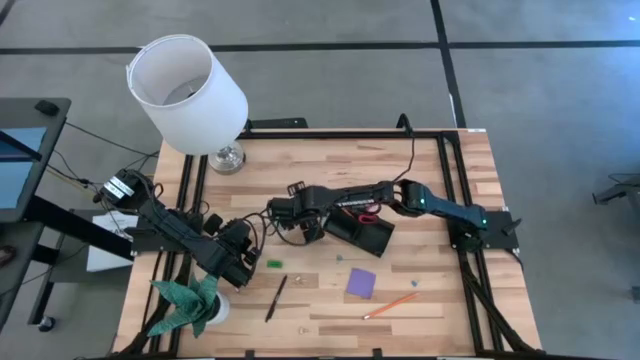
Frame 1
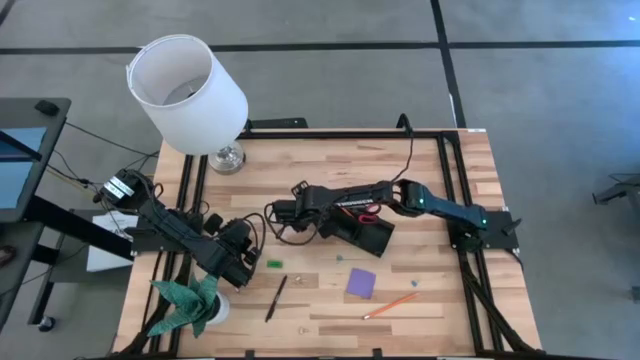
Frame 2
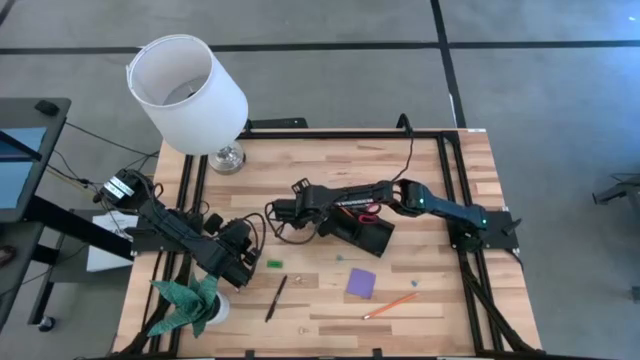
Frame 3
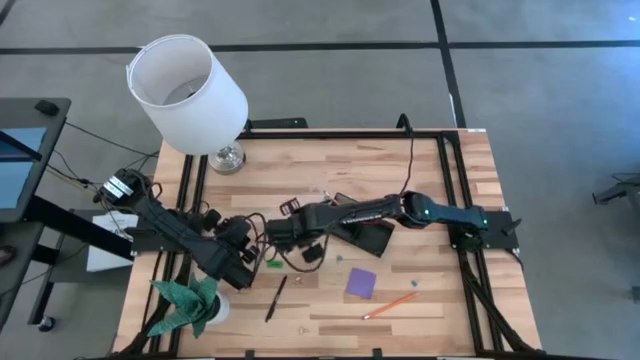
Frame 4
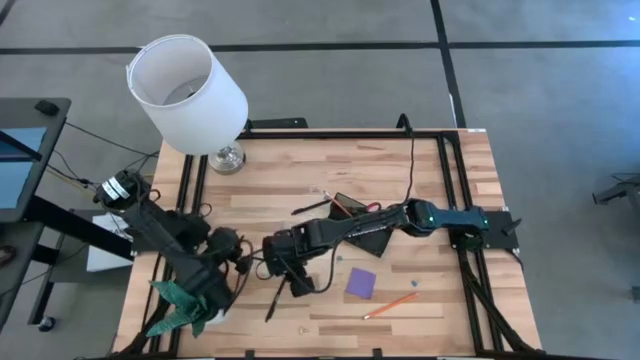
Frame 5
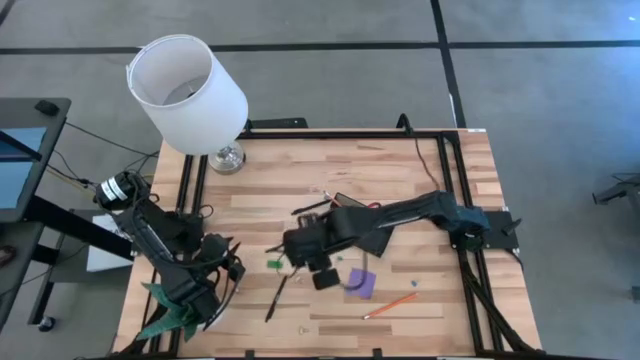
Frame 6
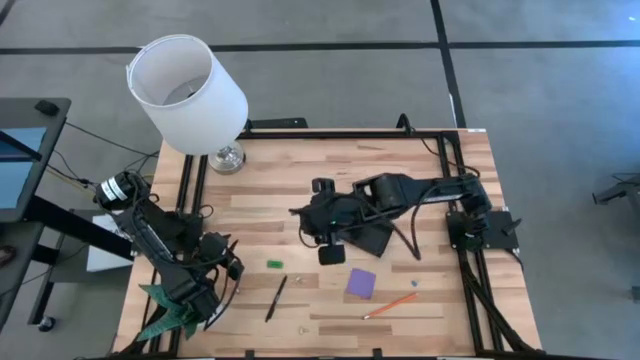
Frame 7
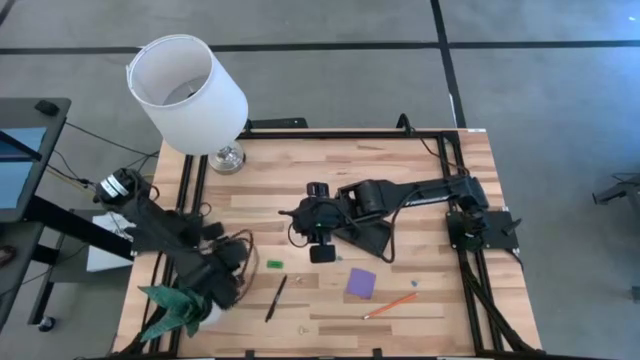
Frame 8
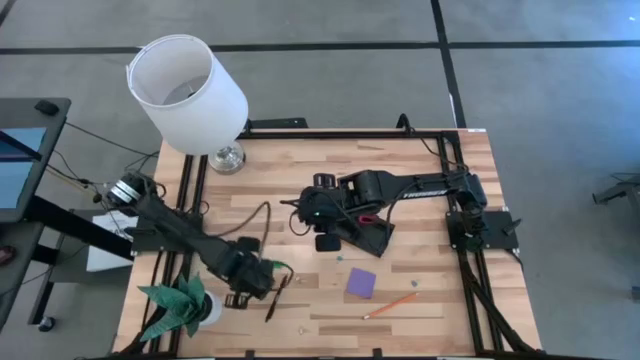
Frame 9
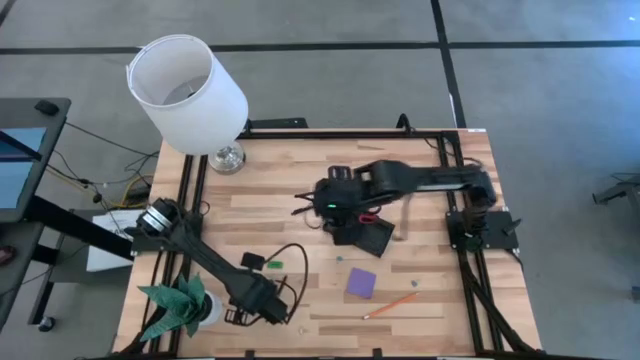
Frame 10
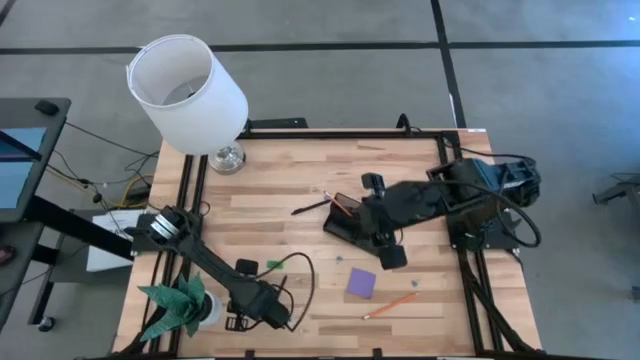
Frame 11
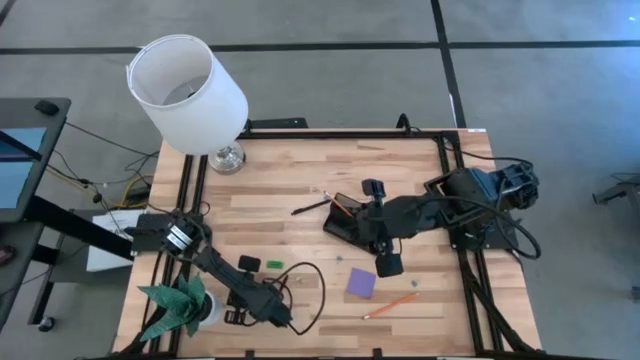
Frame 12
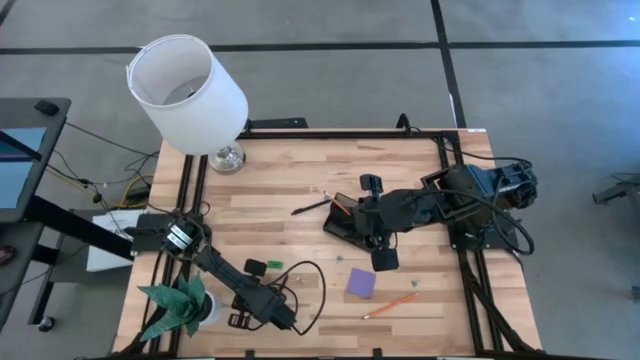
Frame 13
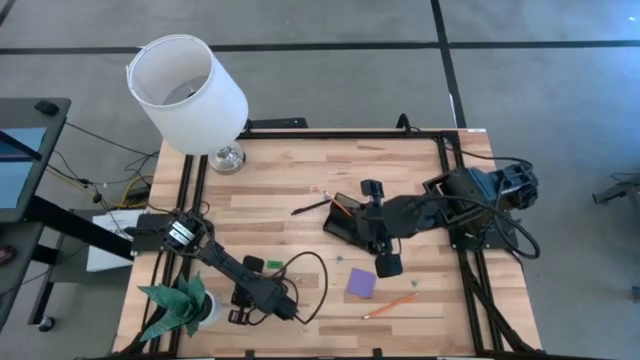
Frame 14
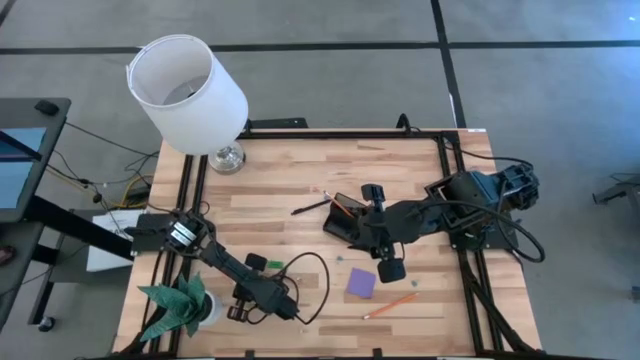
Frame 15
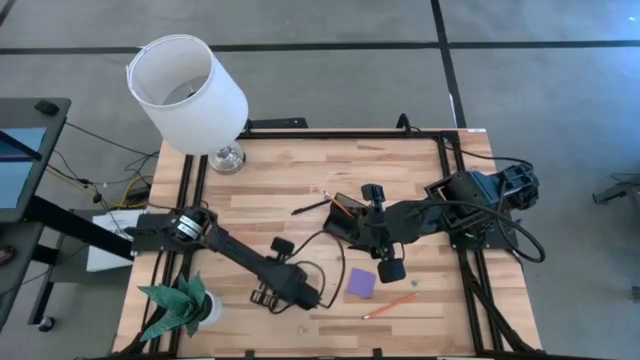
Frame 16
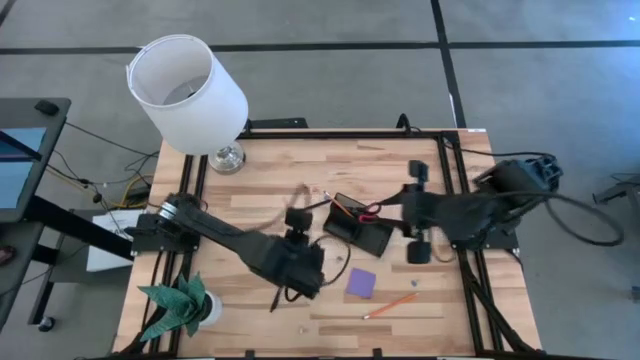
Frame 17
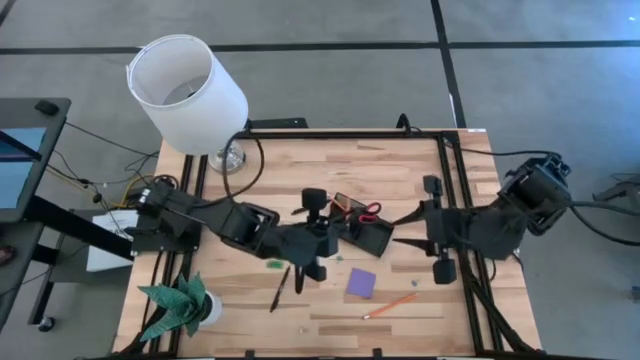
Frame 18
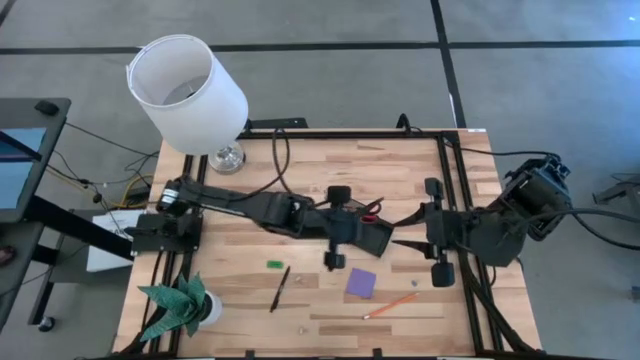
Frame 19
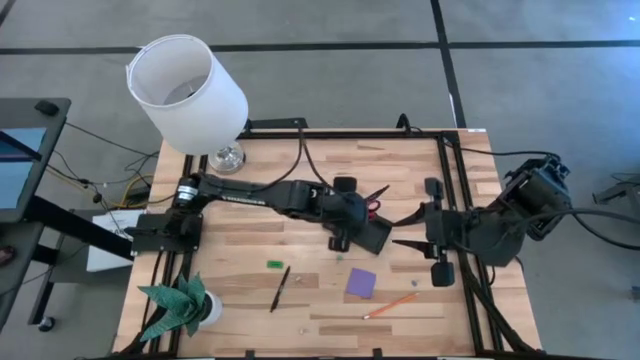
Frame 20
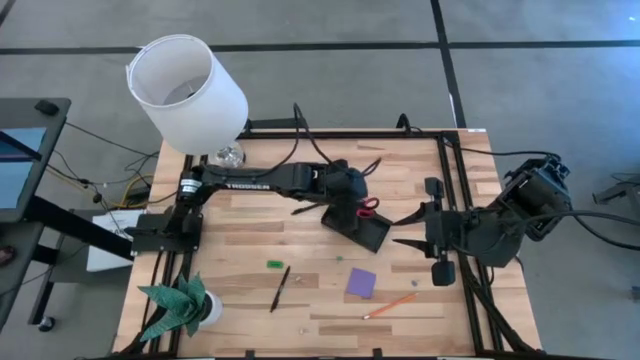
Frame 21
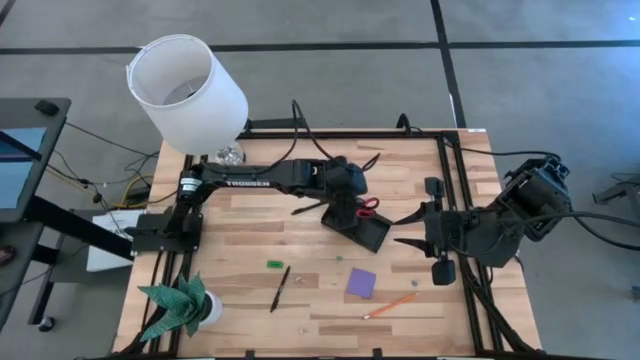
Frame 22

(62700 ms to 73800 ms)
Task: Pick and place office supplies into organizer
Put the left orange pencil into the black desk organizer

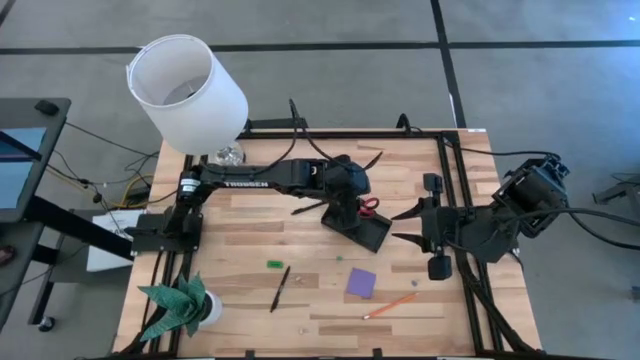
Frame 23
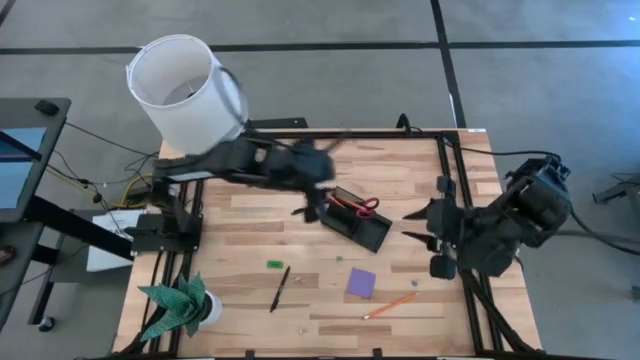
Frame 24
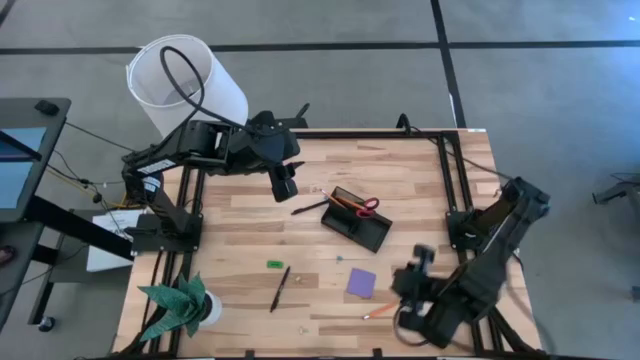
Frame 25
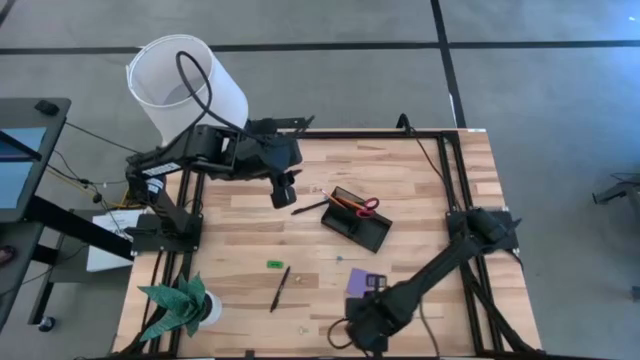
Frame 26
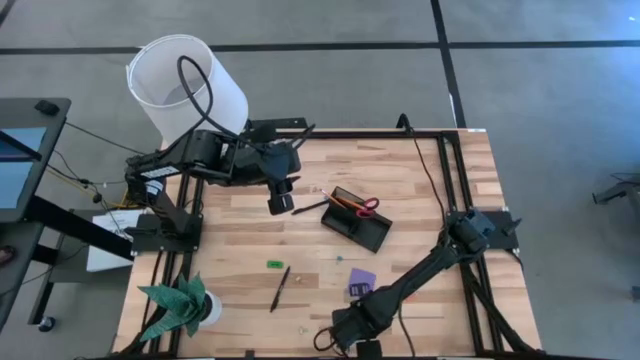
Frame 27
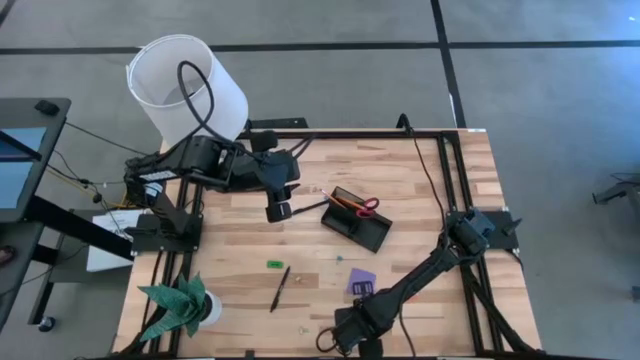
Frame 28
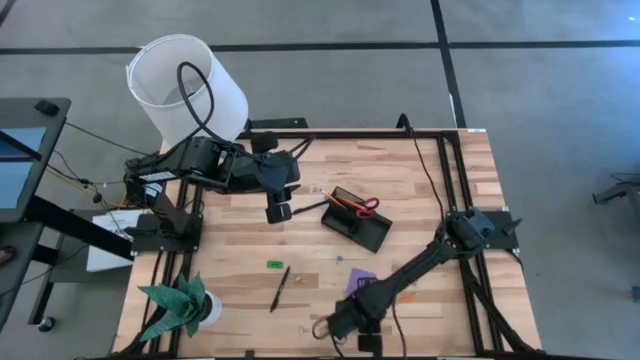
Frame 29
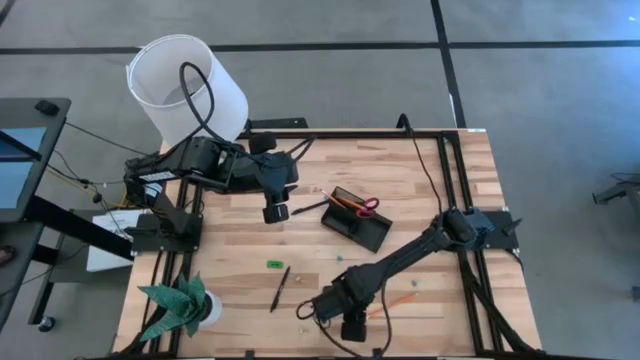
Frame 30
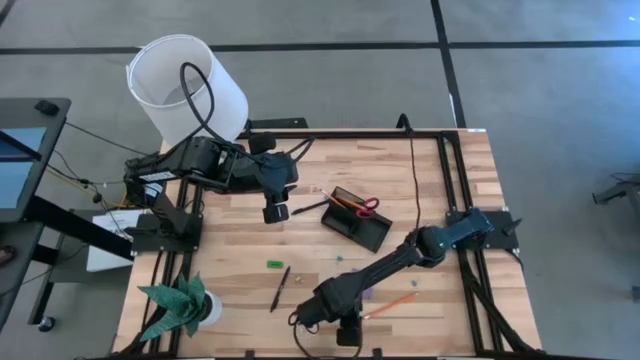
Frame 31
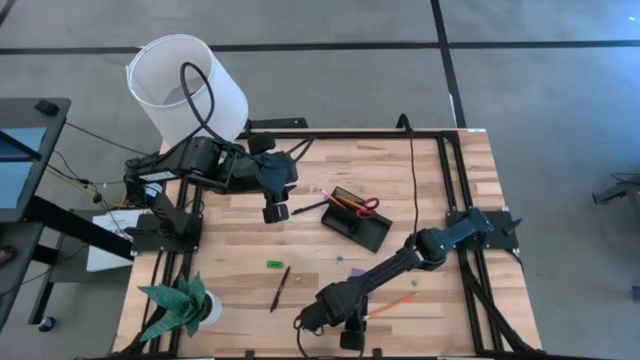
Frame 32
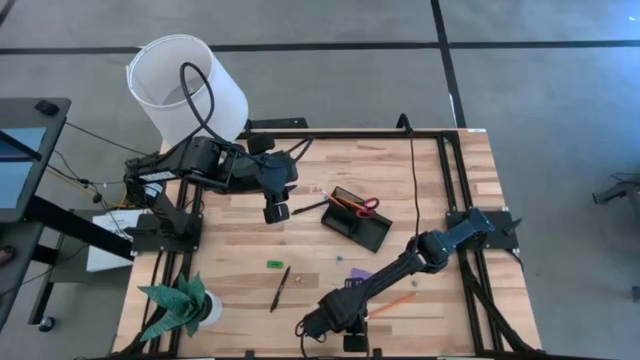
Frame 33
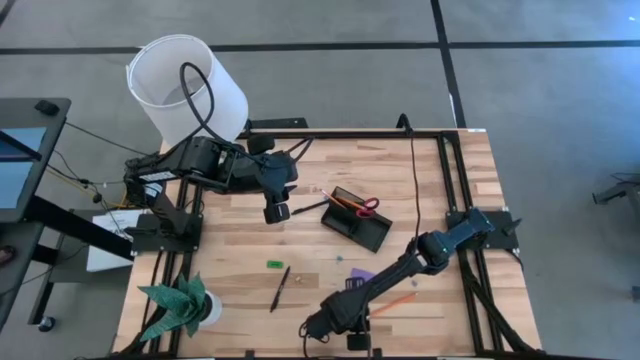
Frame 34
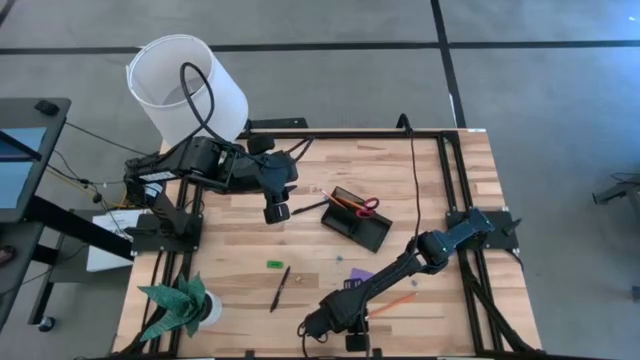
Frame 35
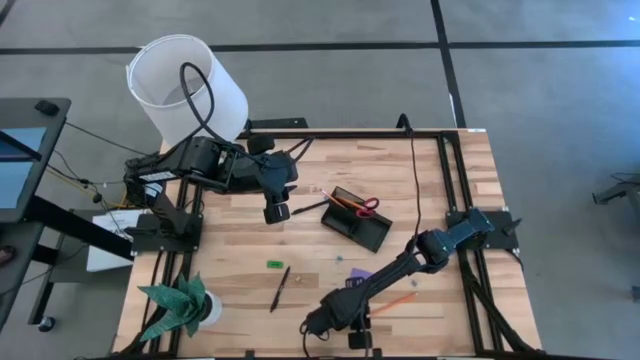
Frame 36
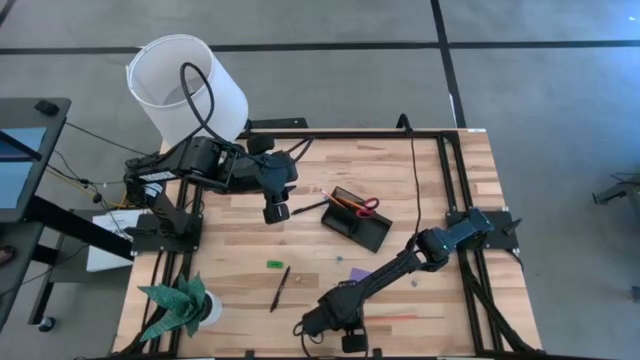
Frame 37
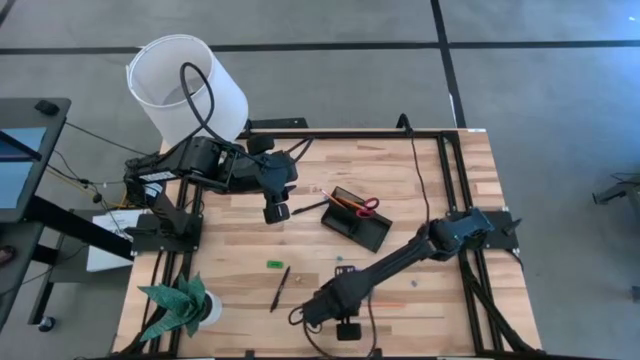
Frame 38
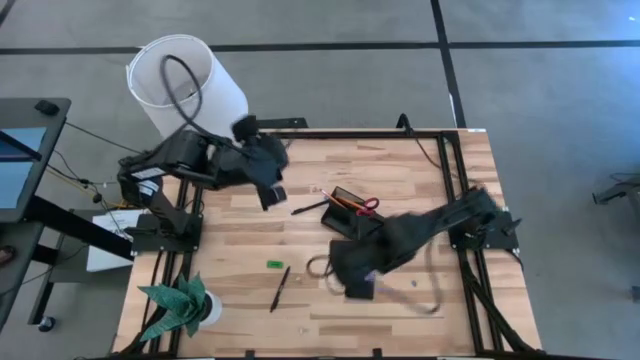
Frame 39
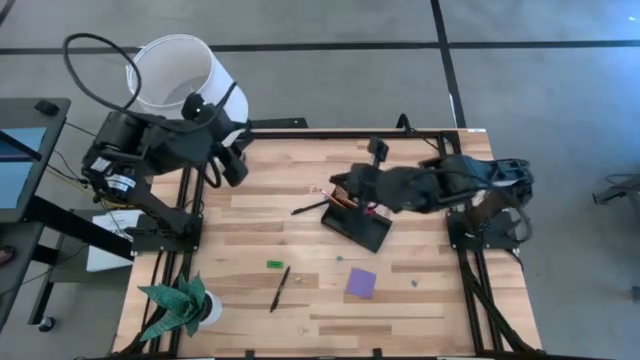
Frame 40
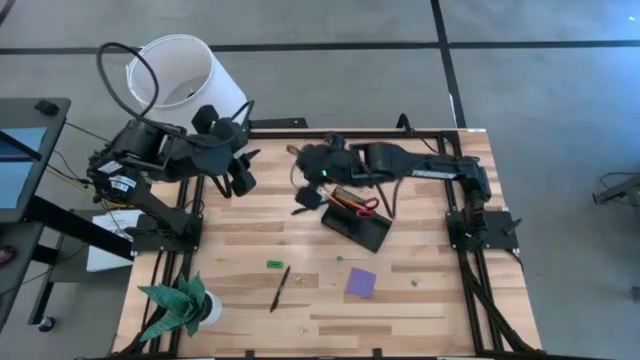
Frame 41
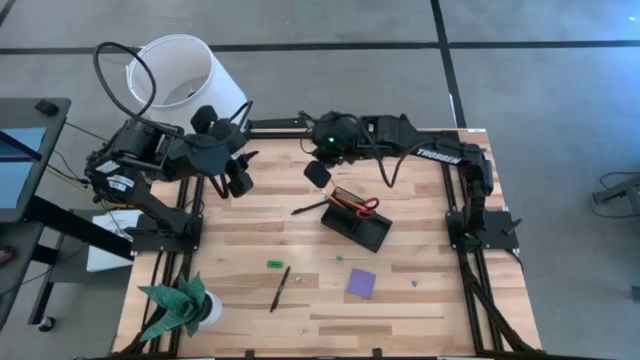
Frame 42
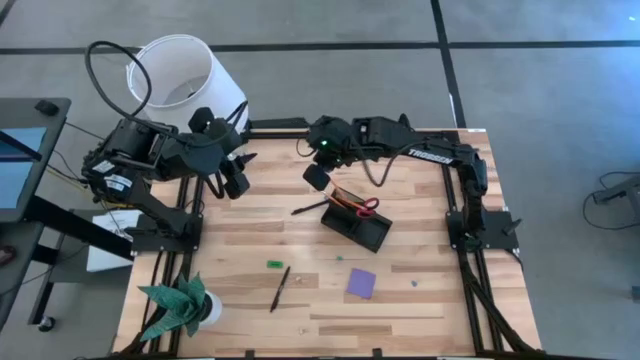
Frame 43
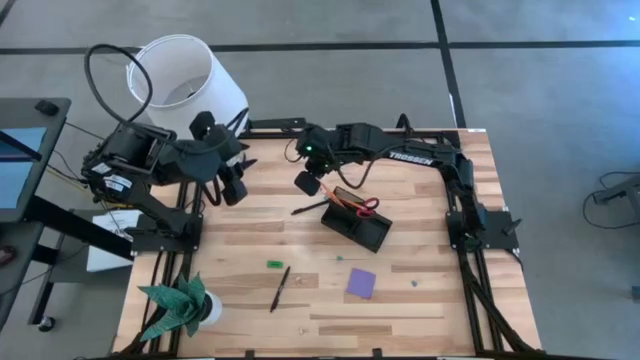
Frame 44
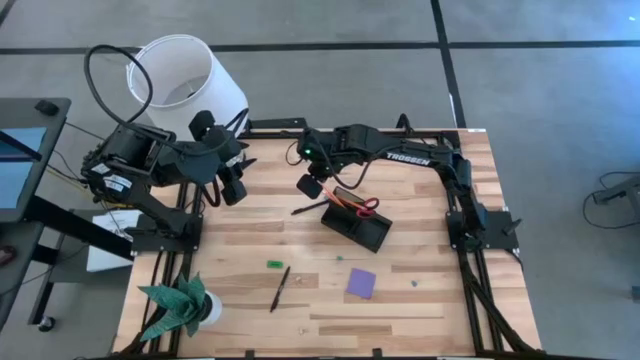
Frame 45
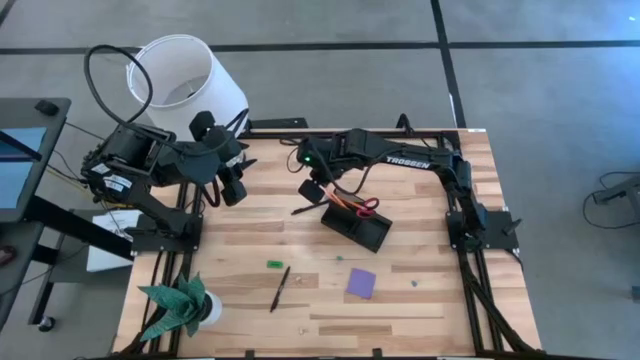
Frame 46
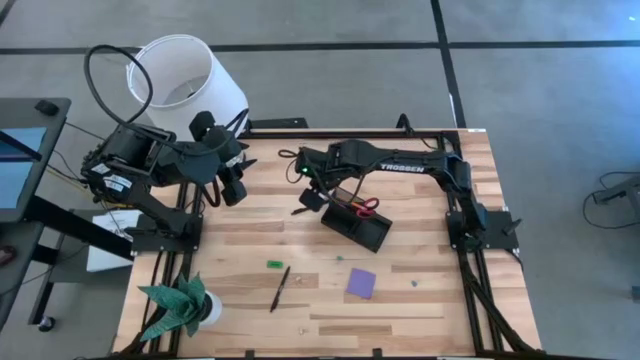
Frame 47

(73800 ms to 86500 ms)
Put the orange pencil into the black desk organizer
